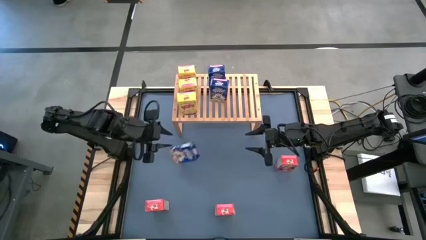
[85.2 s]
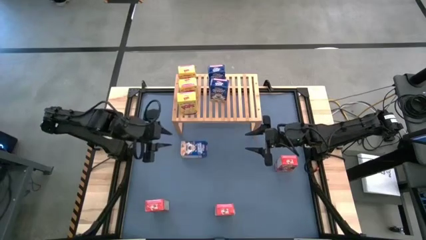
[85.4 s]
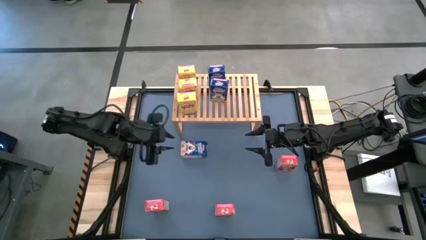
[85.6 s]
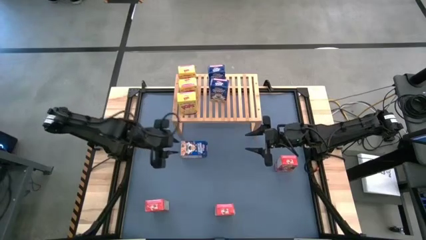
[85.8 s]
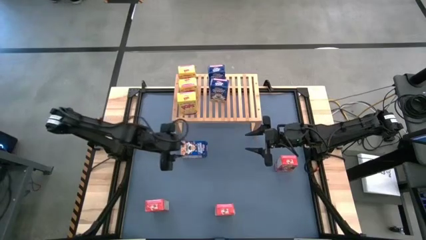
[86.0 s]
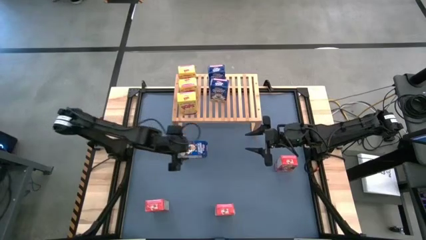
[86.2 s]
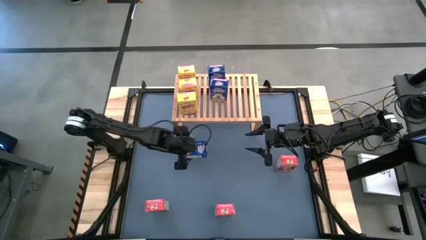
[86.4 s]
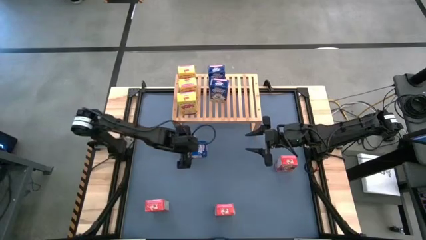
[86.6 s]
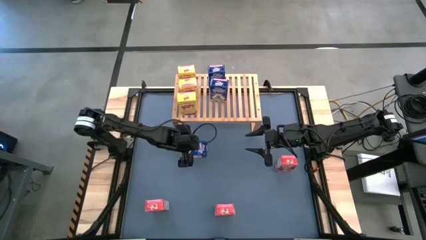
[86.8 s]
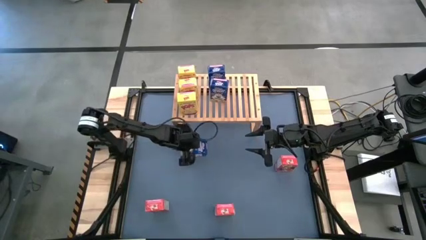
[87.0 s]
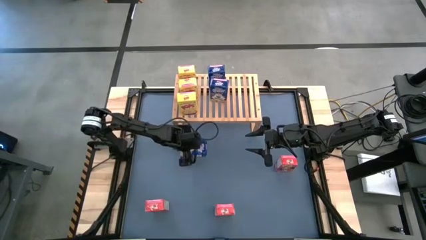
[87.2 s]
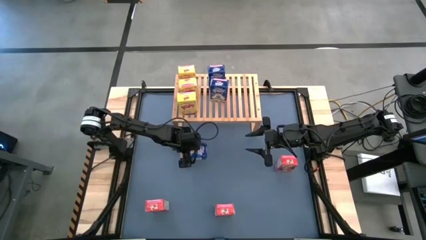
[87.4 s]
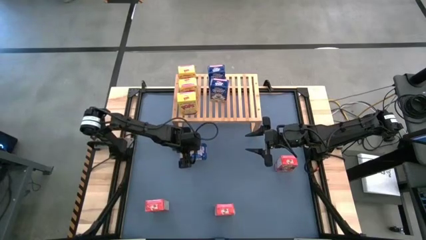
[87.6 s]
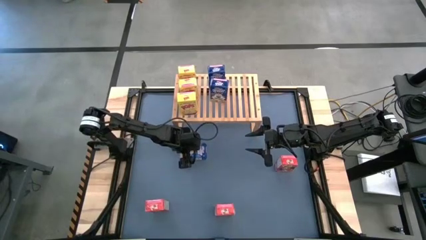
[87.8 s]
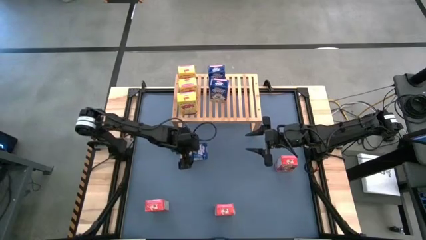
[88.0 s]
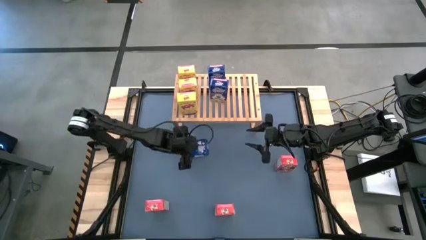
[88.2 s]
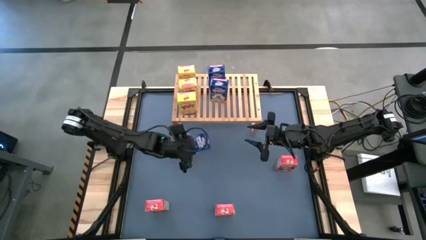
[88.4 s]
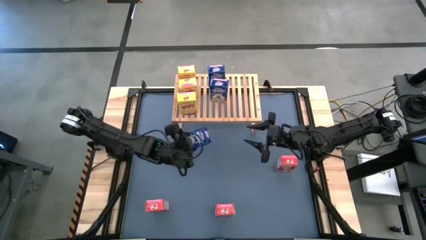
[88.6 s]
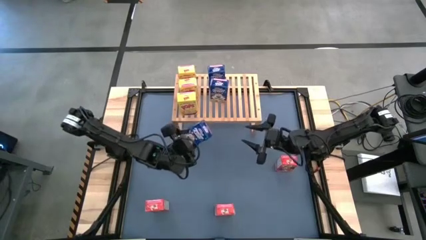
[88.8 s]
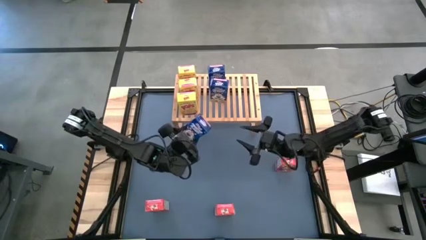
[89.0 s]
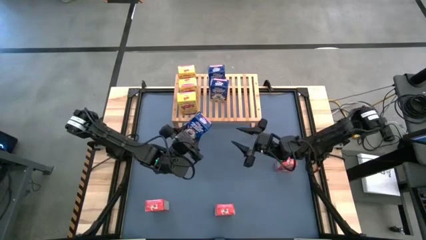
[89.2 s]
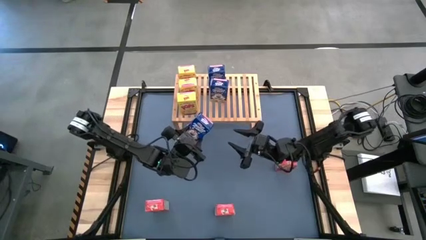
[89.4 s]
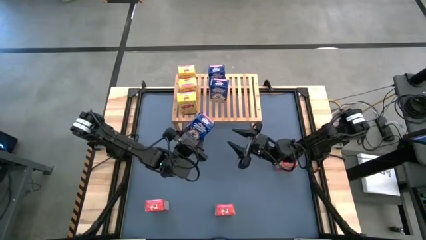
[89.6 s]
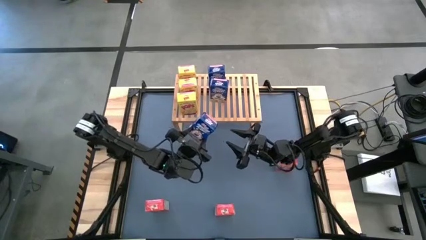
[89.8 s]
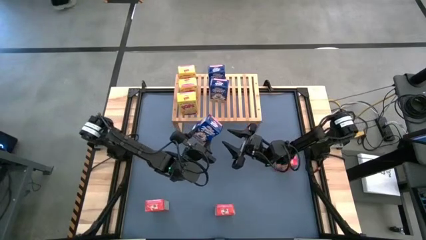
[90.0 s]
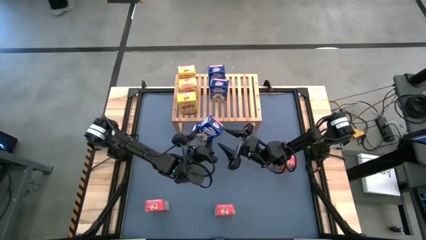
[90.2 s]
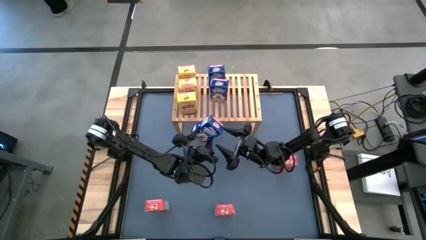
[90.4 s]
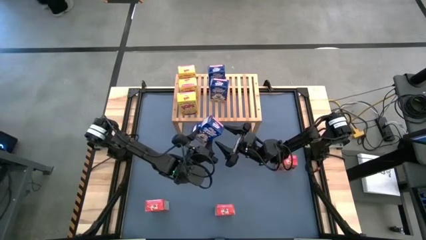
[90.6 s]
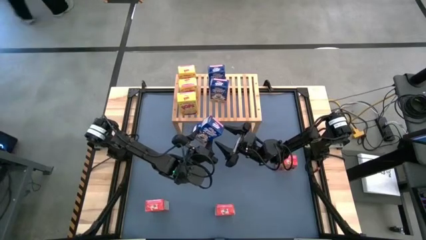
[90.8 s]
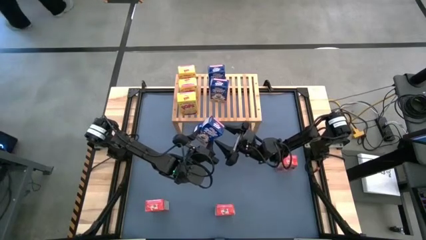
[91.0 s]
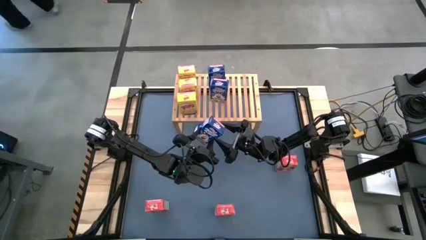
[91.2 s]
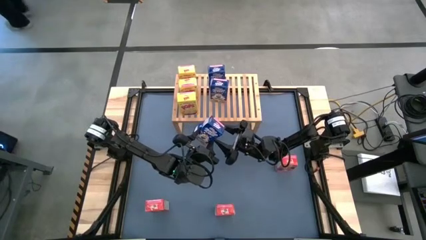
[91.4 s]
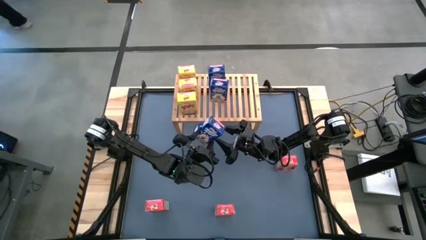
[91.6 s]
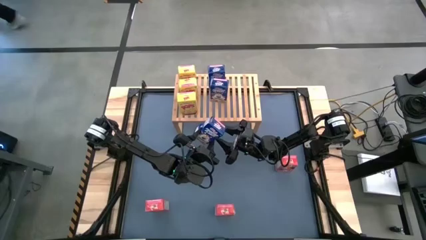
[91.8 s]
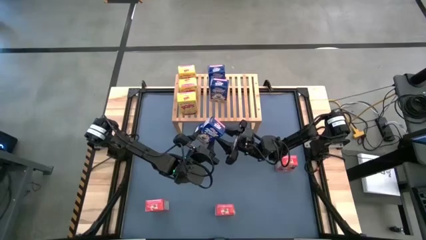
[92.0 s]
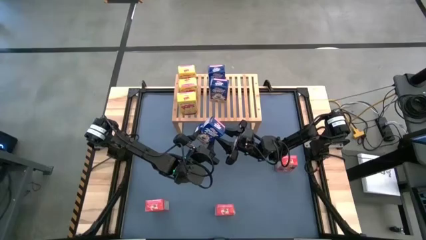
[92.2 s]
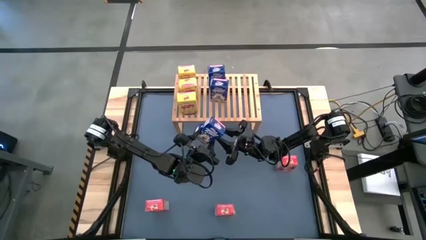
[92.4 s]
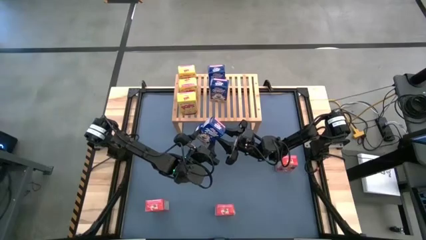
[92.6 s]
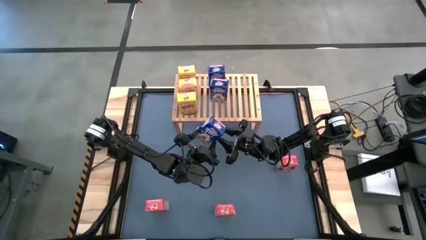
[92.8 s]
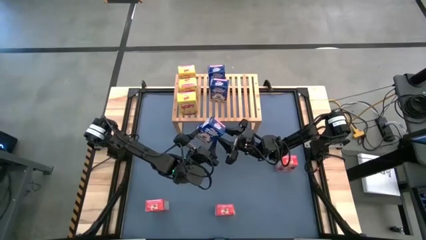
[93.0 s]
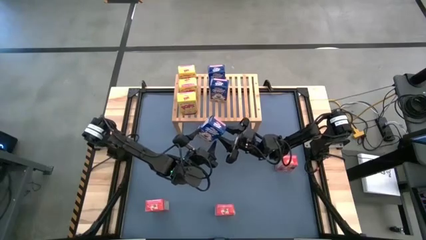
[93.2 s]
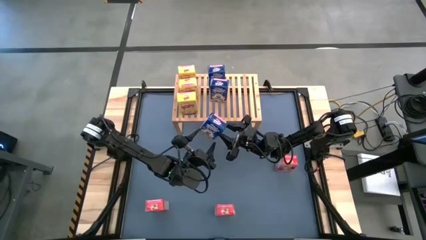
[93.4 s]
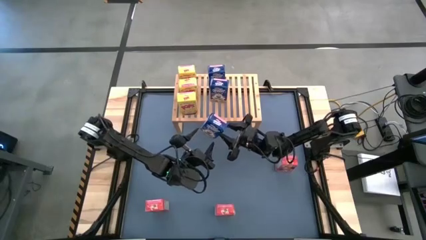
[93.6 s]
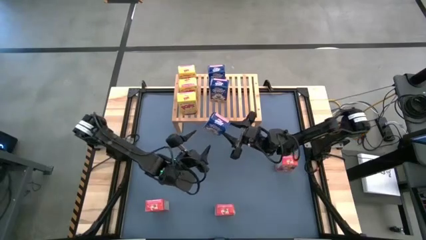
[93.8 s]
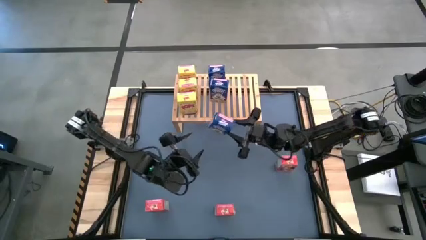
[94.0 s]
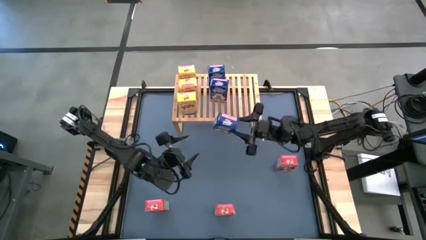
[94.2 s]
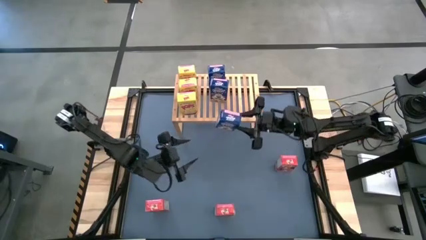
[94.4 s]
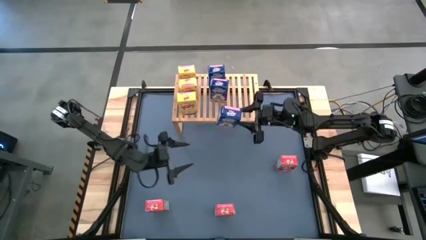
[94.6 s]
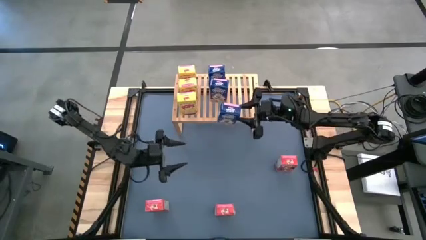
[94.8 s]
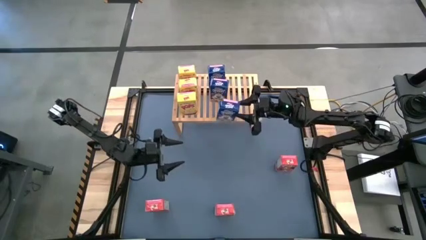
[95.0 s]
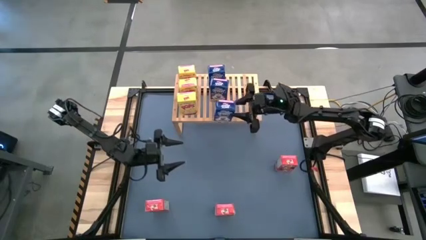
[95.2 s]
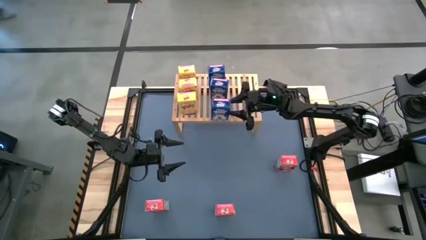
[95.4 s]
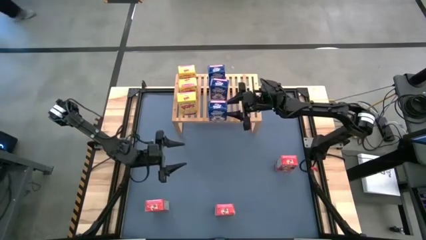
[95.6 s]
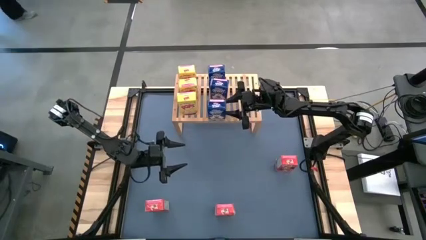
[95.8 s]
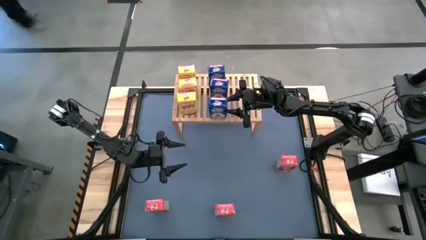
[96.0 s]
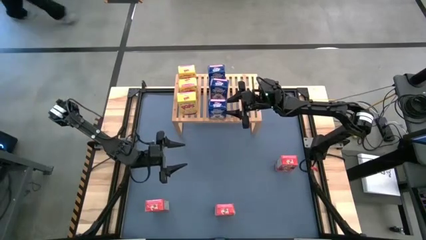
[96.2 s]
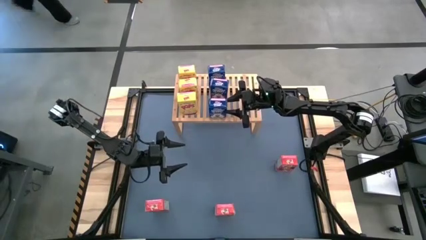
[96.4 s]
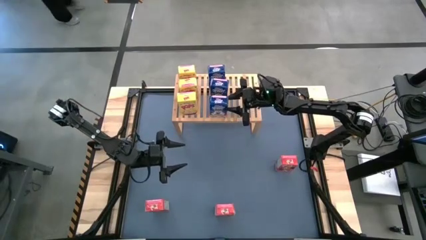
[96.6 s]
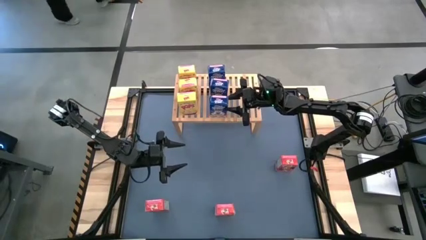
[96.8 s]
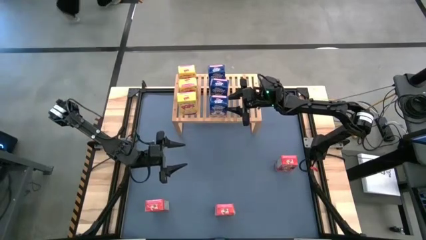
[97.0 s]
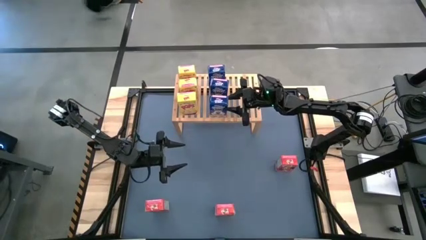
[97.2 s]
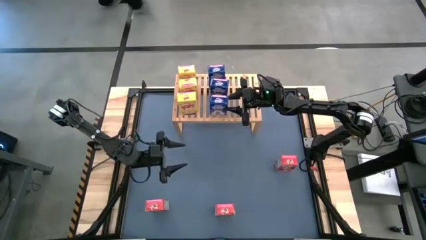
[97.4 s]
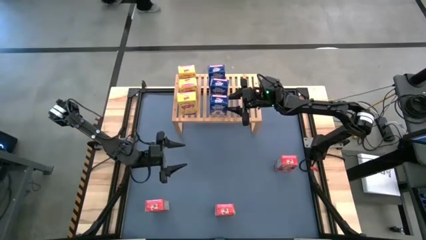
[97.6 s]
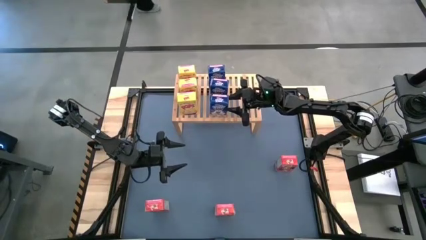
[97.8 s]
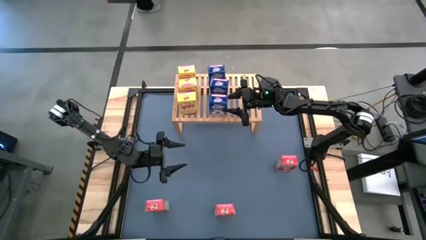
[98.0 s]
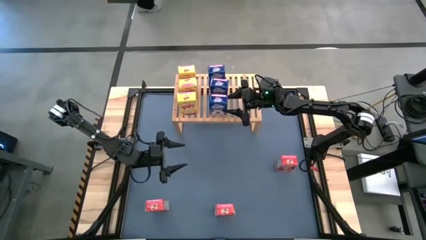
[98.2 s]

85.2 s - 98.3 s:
Task: Stack cereal on shelf
Put the blue cereal box aligned with the other blue cereal box on the shelf

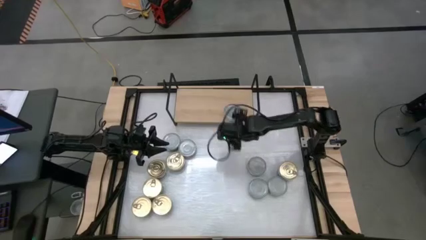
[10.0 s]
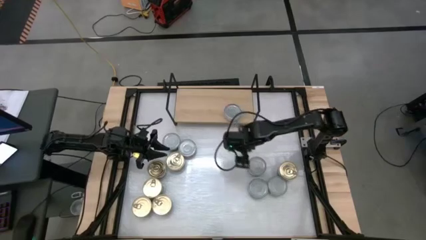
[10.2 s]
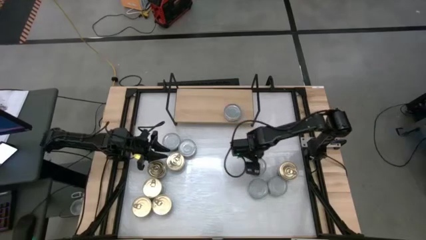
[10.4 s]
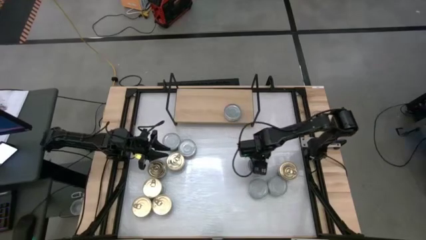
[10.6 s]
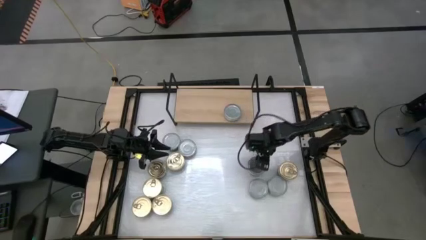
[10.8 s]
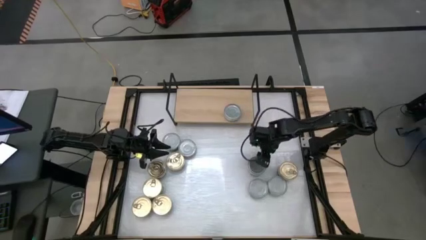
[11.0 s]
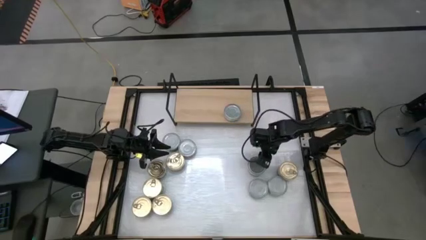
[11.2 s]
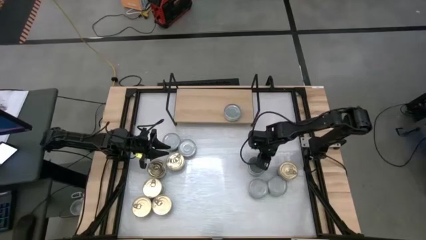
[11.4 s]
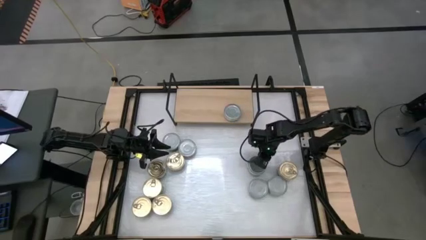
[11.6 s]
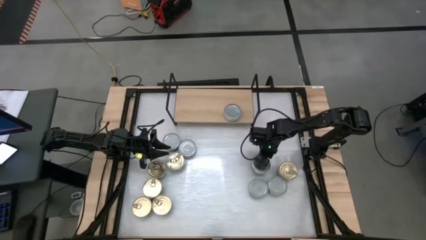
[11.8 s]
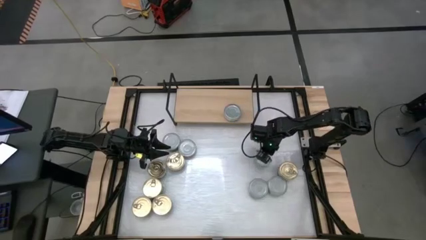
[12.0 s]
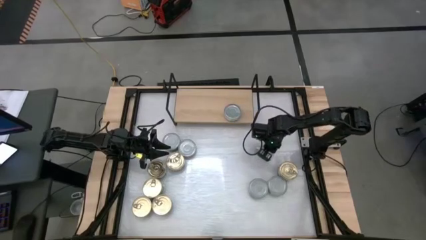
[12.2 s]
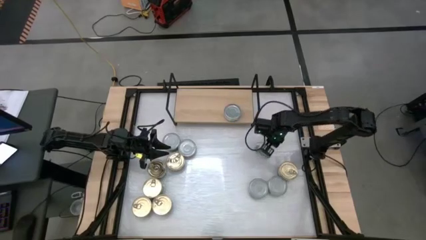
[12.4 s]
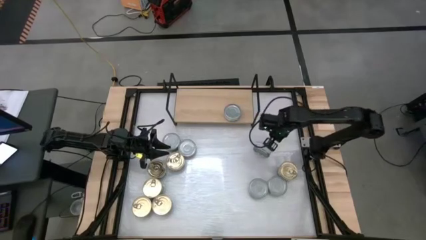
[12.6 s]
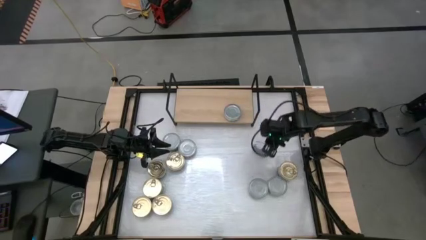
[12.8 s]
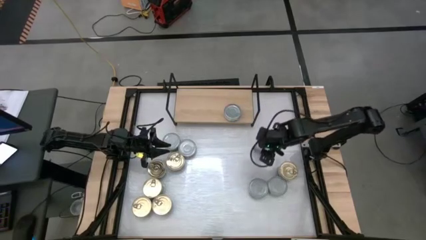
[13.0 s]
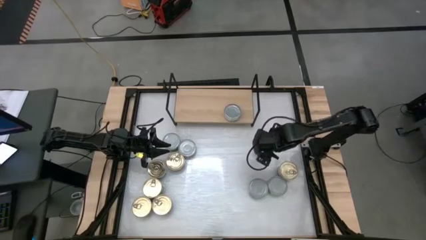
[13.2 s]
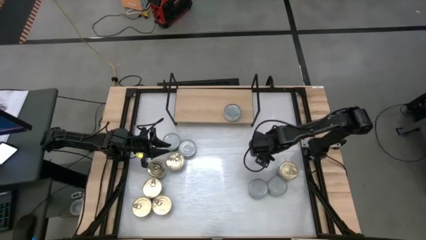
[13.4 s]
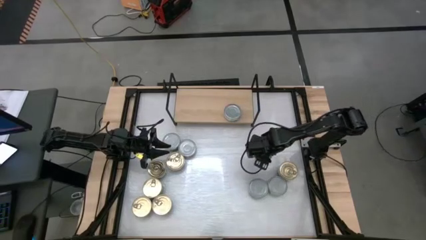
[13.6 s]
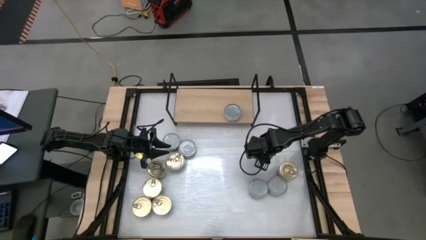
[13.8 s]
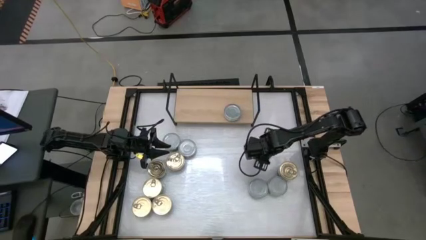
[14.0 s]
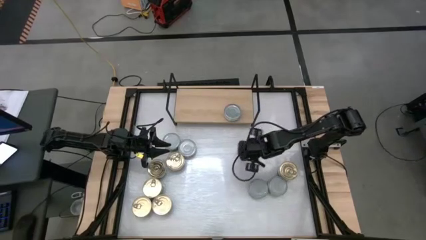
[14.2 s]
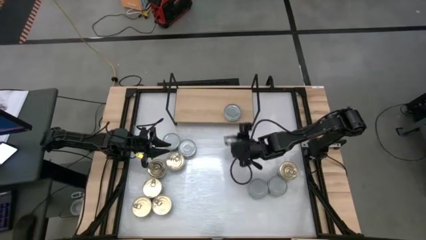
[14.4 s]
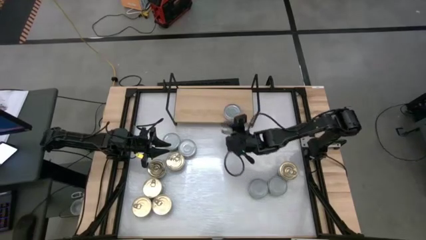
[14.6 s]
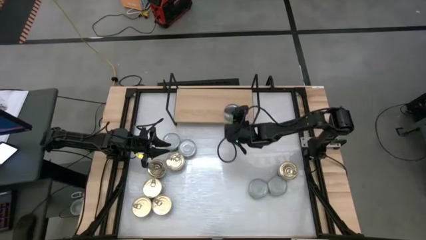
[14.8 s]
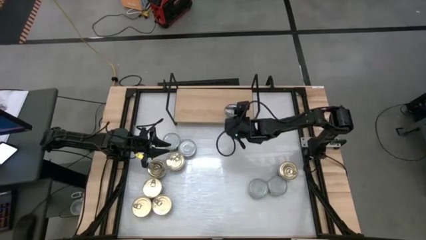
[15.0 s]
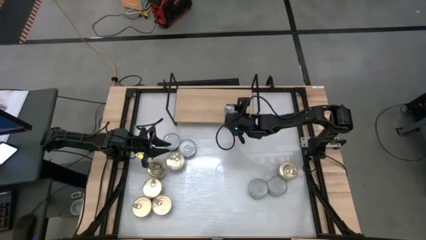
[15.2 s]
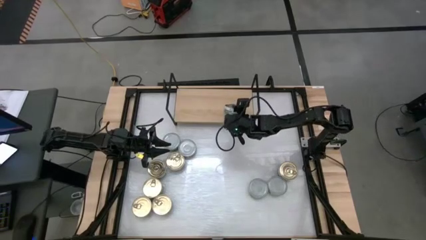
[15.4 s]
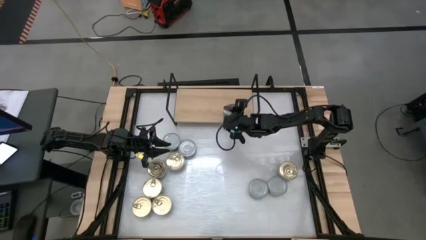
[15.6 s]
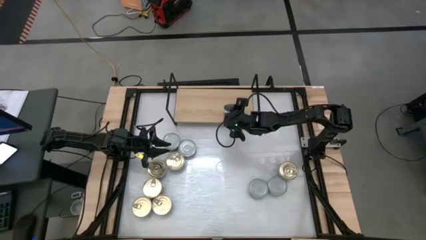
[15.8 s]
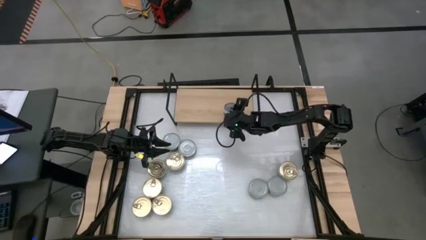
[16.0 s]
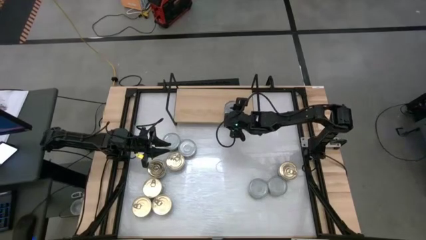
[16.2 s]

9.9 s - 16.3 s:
Task: Stack canned seafood by type on shelf
Stack the green tuna can on top of the green tuna can on the shelf
